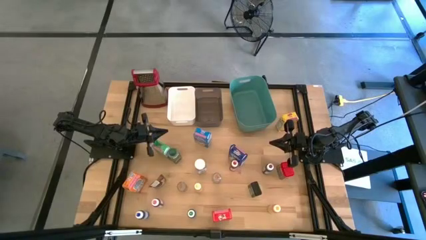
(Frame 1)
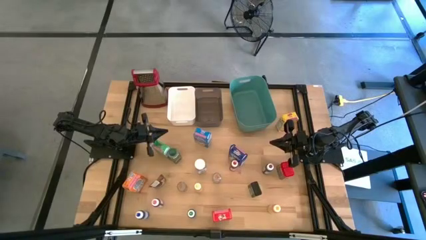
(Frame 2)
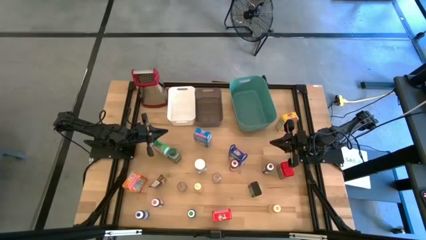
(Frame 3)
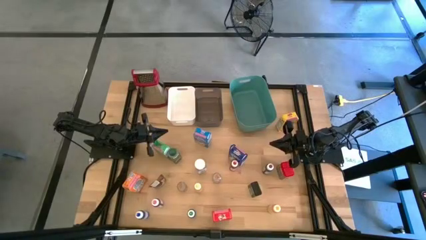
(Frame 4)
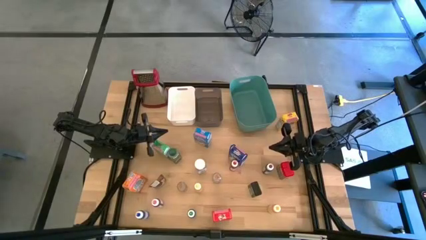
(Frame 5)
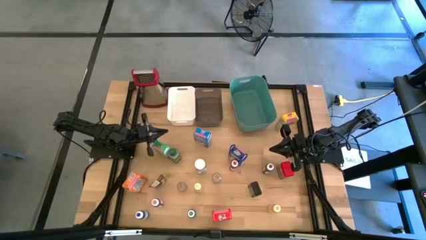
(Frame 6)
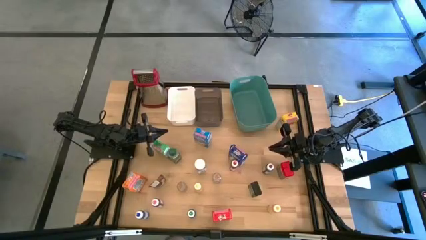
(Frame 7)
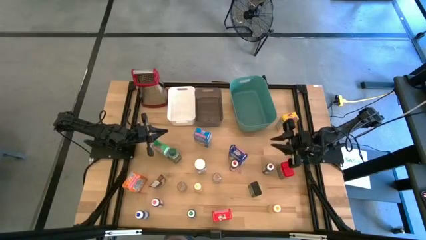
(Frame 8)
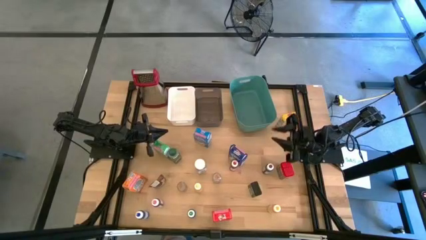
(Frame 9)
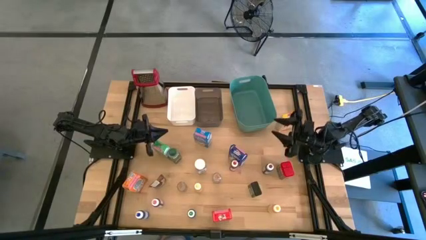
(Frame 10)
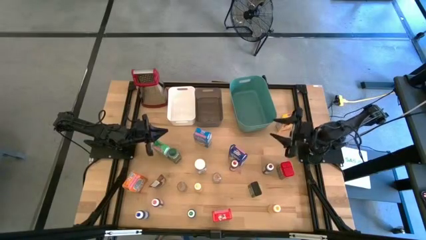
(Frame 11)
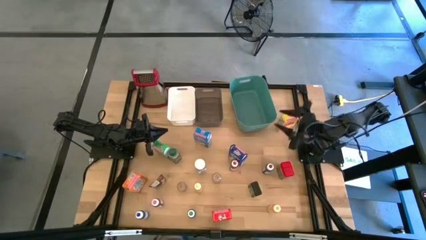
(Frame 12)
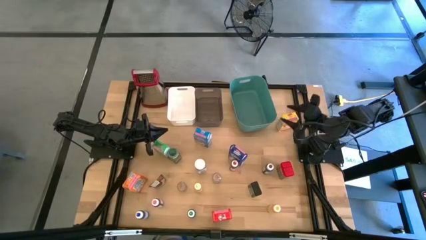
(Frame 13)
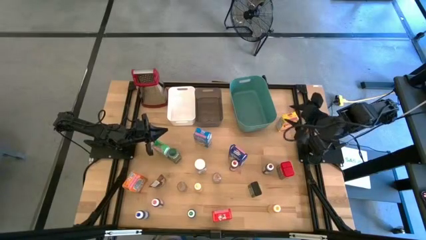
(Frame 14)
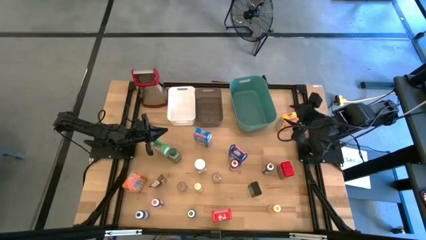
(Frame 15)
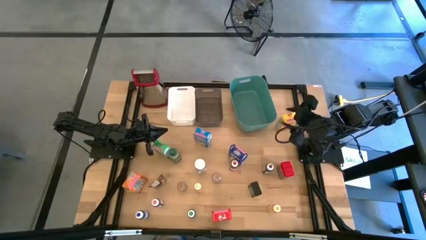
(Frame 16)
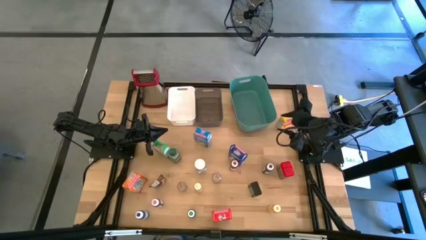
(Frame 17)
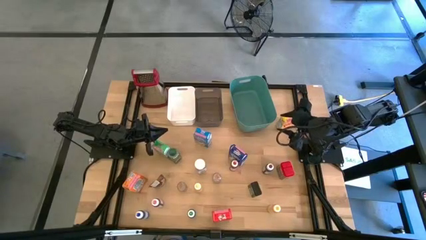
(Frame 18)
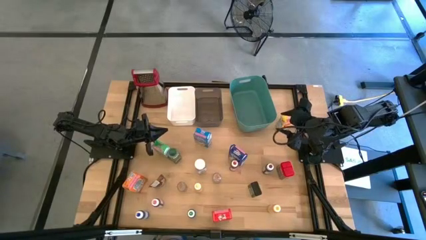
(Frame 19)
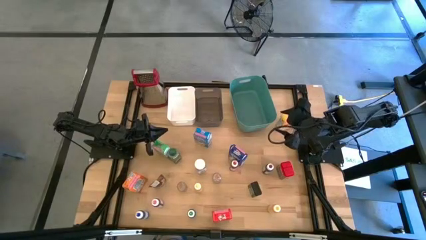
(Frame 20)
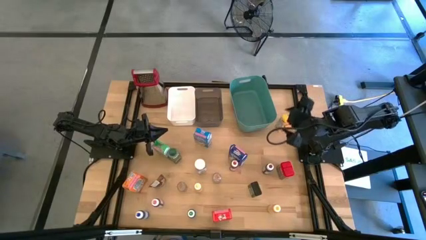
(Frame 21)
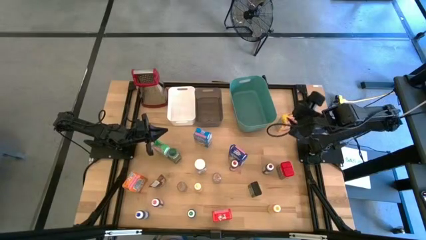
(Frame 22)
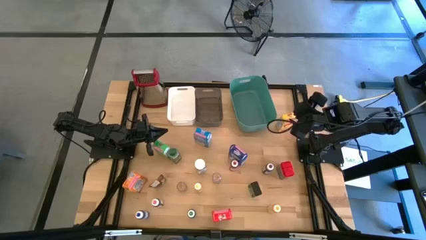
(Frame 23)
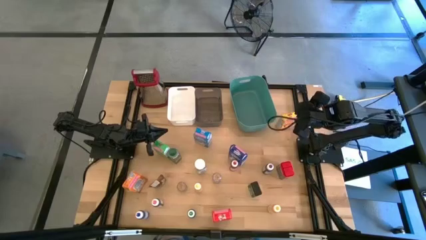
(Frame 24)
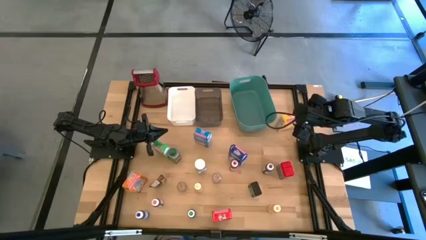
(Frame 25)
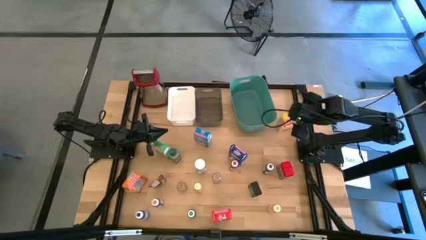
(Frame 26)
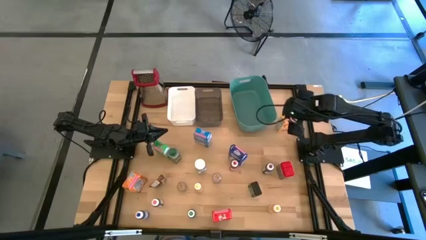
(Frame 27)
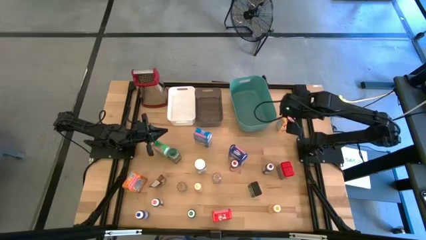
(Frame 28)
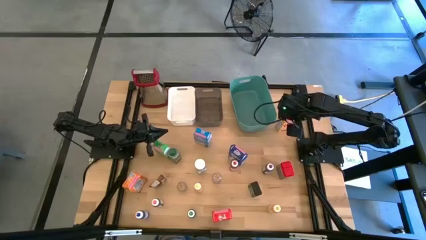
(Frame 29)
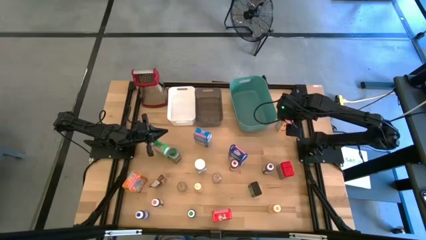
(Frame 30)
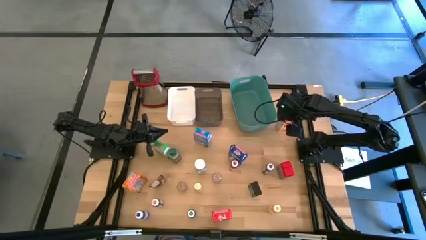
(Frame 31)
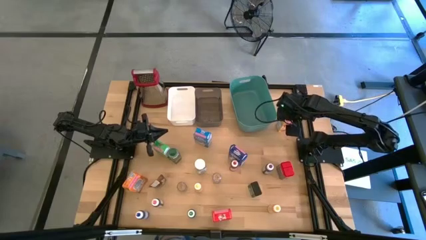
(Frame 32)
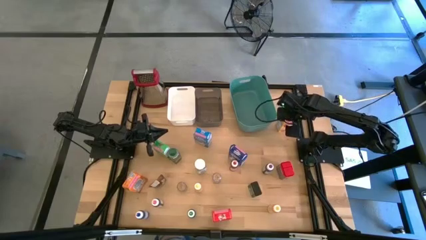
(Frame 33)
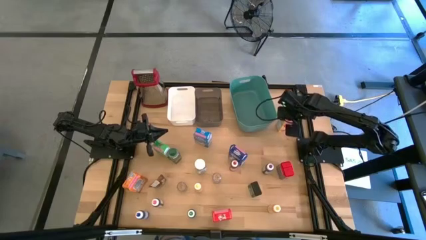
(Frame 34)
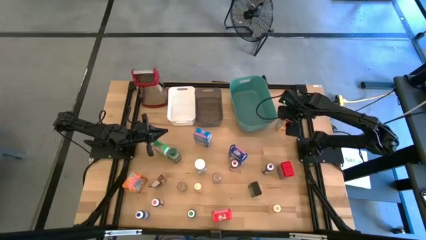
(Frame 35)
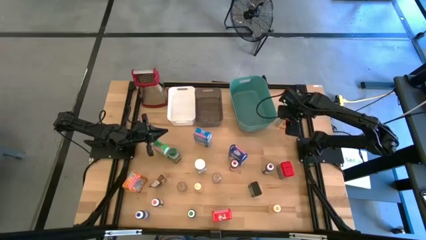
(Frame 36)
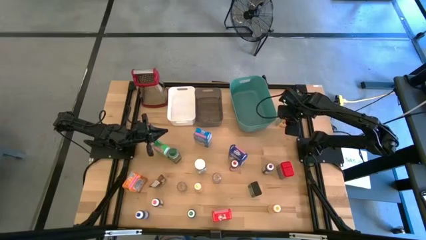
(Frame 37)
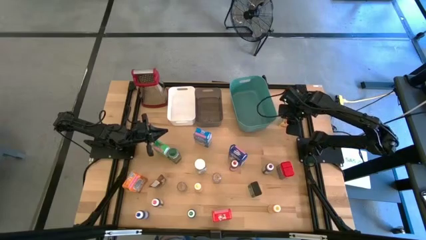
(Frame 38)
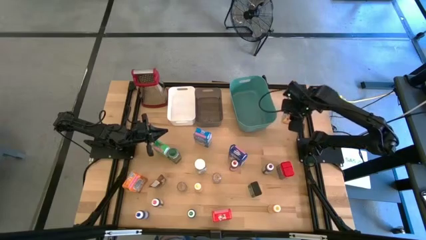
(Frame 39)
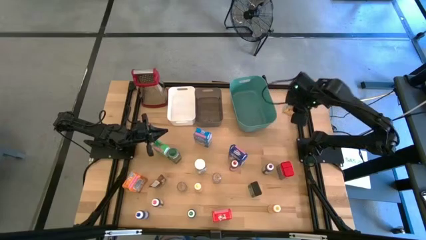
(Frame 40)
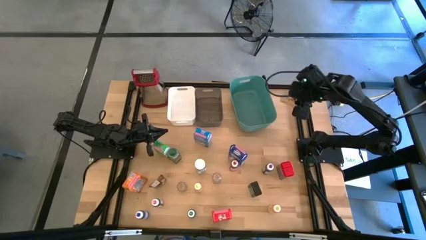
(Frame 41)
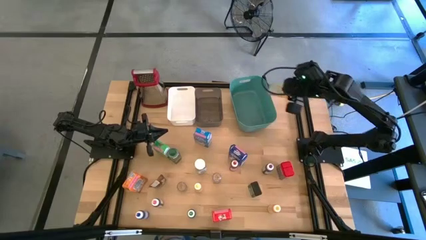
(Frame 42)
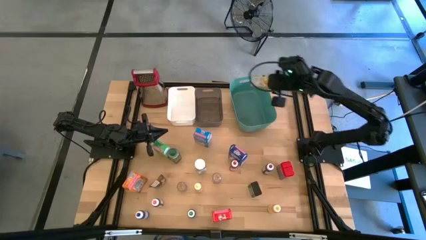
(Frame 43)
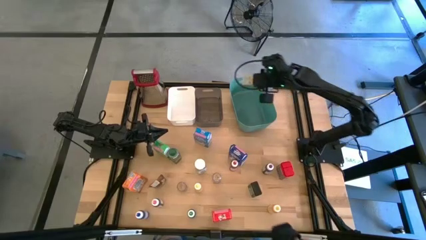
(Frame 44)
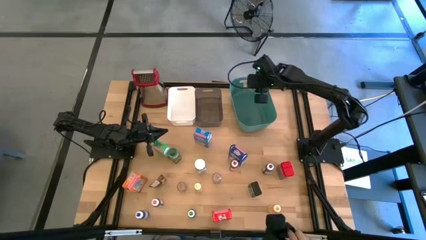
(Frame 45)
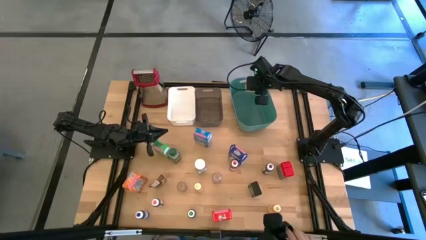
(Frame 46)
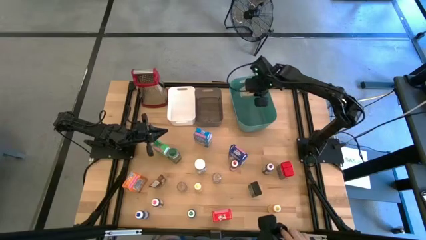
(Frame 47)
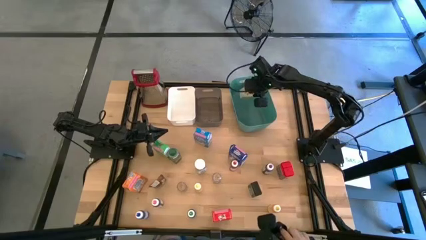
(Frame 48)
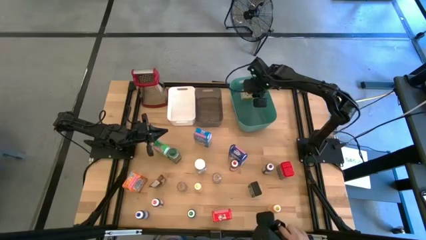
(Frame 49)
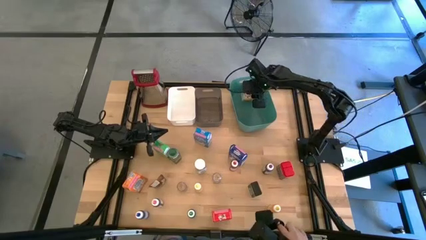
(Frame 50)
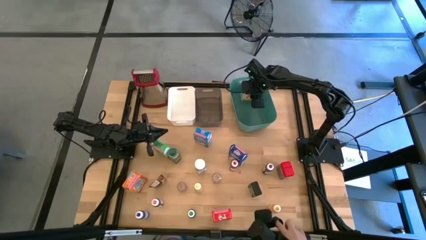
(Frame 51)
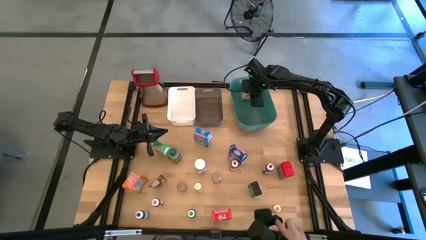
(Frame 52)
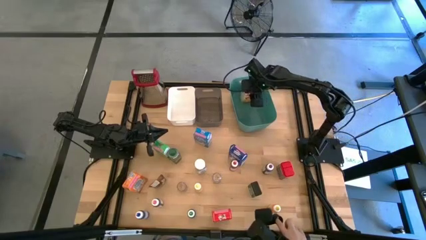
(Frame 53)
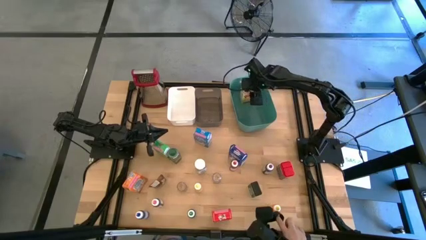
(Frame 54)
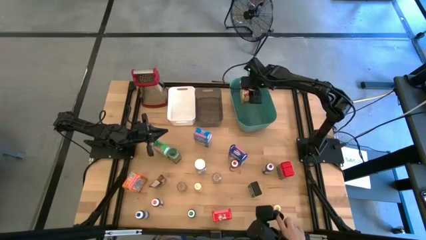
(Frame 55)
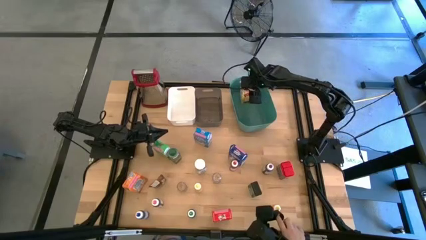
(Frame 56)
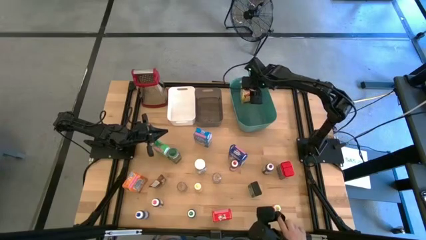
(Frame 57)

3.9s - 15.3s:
Task: Pick & Place Kitchen Items
Put the yellow cereal box into the right green bin
